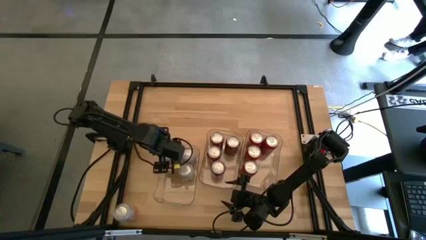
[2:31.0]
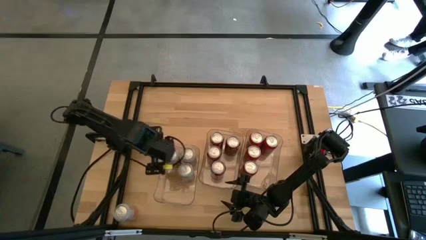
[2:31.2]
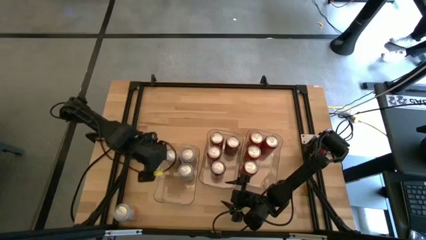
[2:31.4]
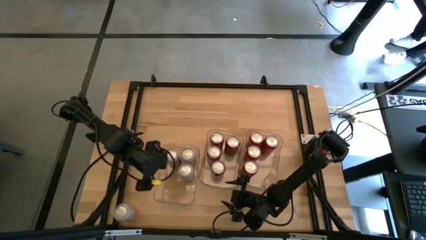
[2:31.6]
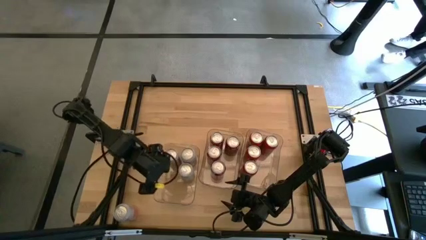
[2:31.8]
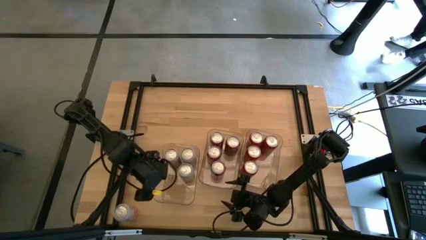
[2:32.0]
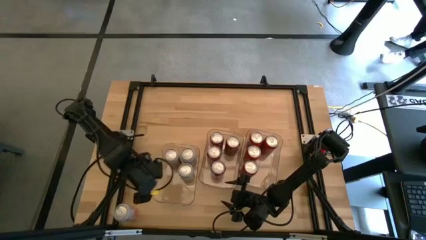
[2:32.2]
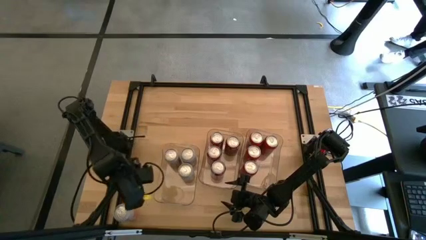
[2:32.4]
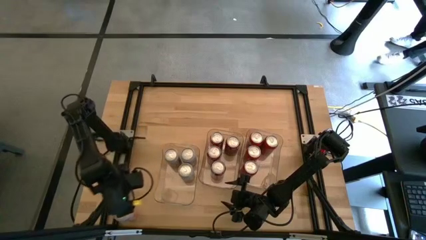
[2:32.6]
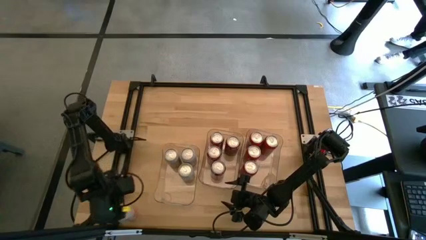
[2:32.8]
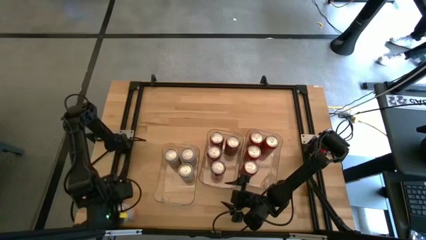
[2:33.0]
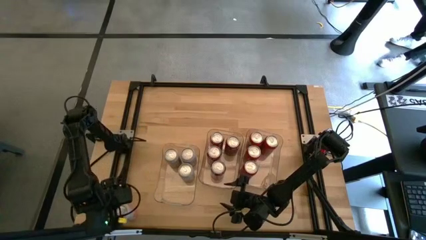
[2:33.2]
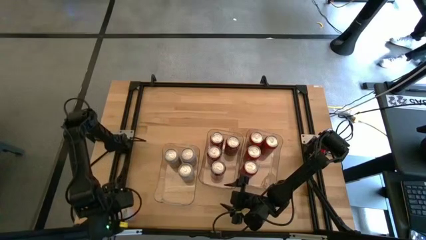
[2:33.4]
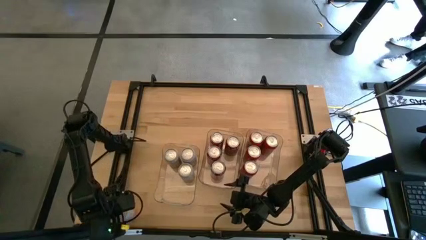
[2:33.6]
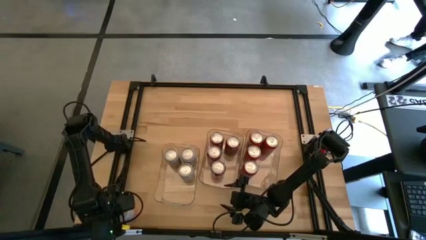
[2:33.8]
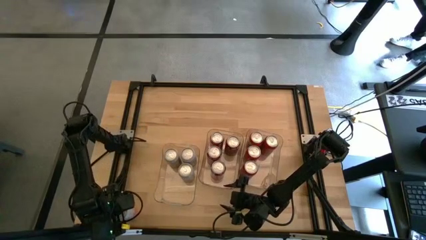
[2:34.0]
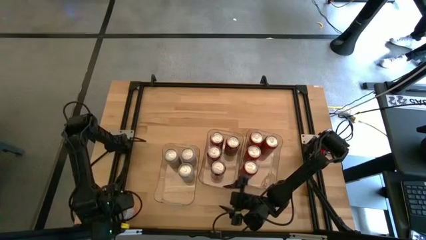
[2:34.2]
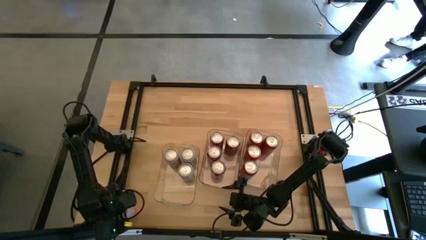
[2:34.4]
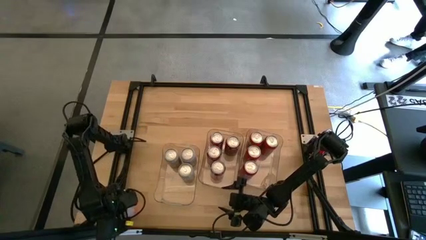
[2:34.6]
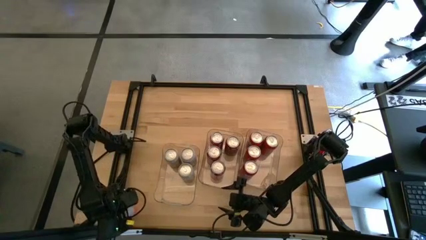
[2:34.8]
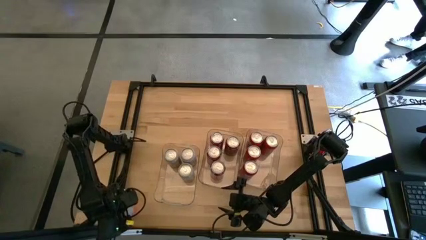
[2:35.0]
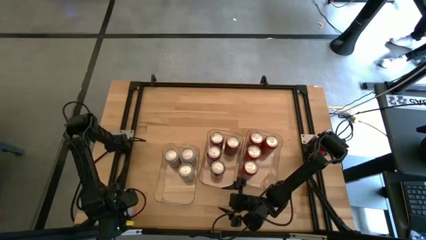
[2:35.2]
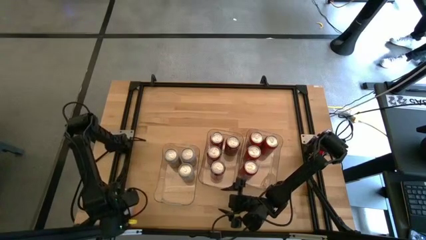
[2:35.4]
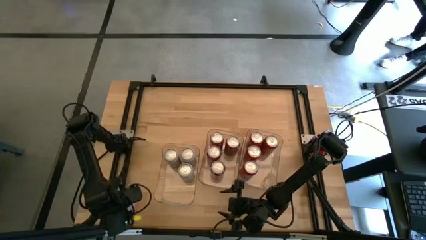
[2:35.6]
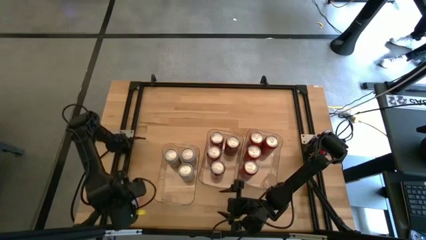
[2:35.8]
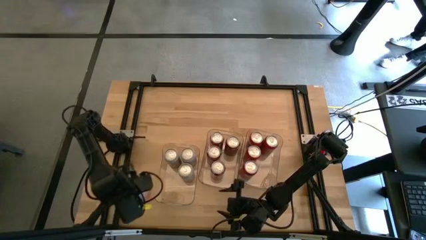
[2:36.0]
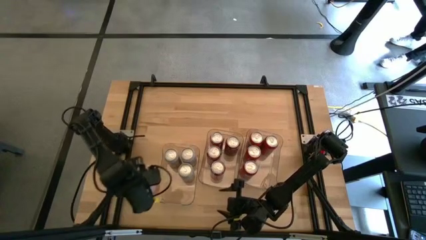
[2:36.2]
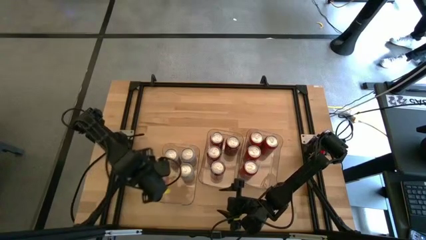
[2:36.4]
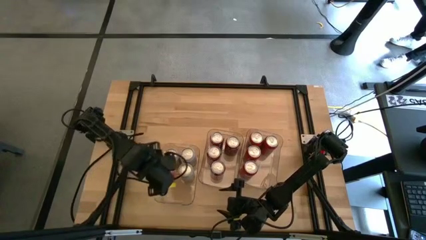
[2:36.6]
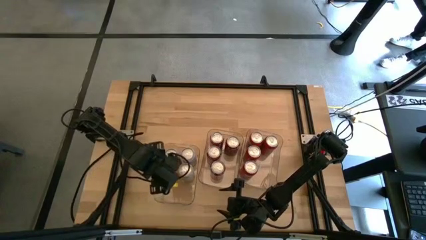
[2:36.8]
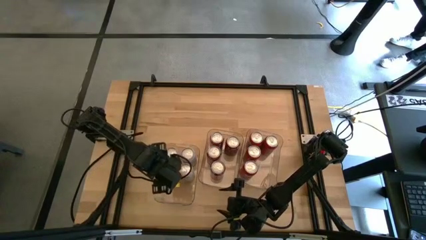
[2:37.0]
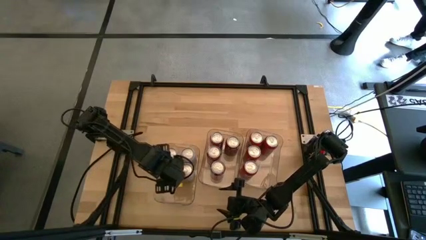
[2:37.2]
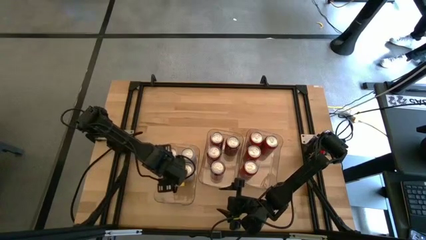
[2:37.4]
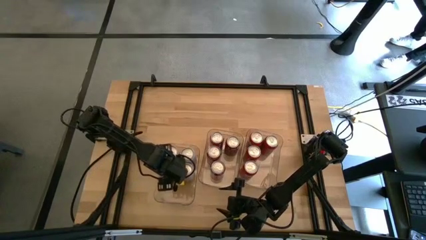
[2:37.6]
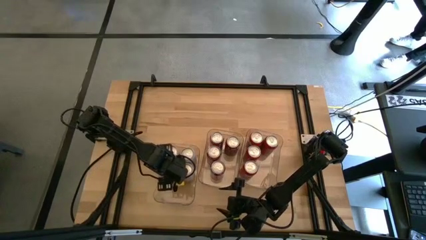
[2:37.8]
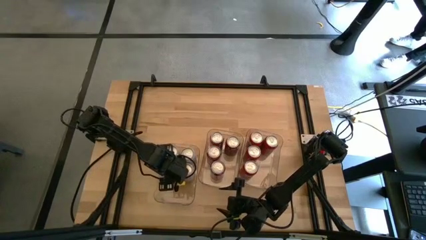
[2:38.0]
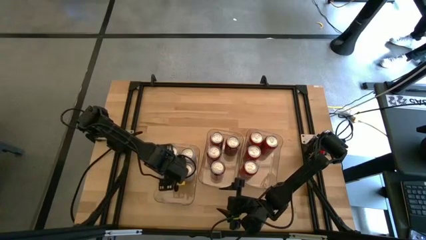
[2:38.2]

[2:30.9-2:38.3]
Task: Sort soda cans
Put the orange white soda can into the left transparent bin

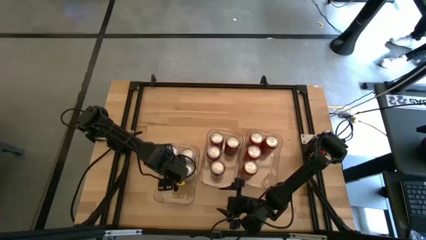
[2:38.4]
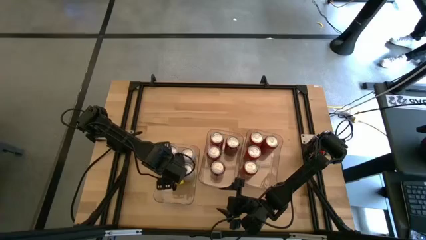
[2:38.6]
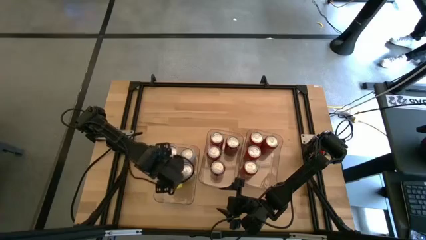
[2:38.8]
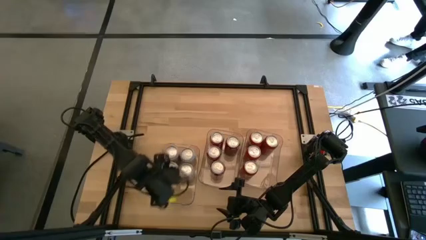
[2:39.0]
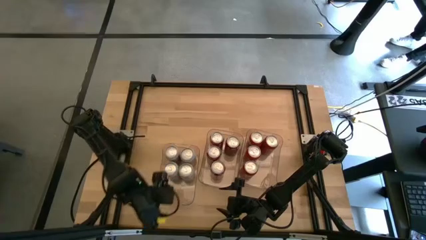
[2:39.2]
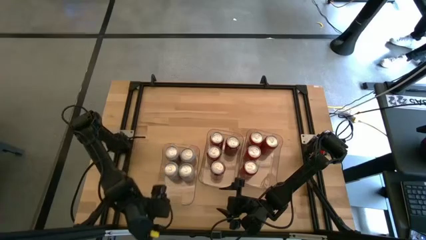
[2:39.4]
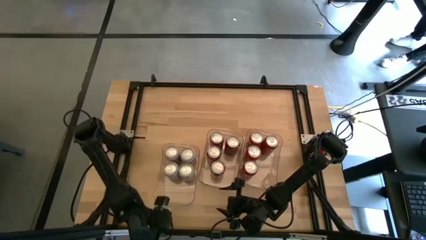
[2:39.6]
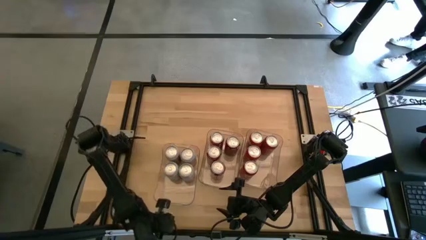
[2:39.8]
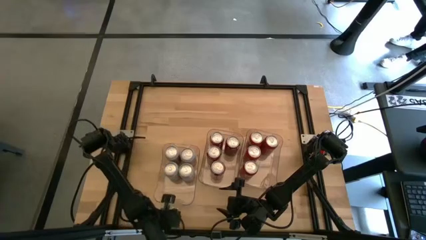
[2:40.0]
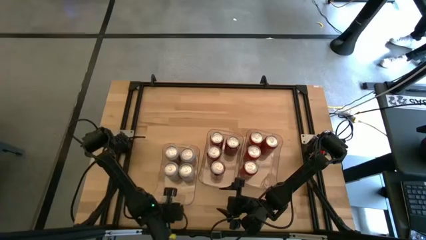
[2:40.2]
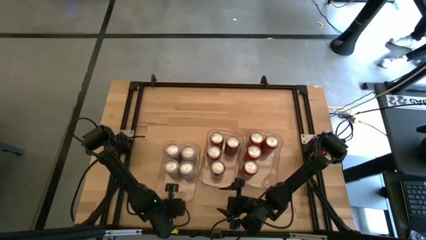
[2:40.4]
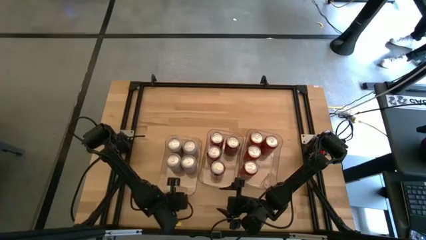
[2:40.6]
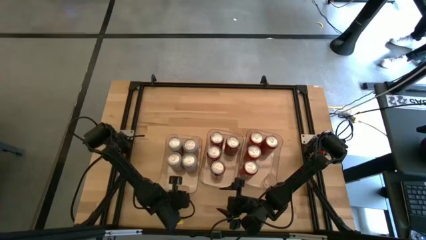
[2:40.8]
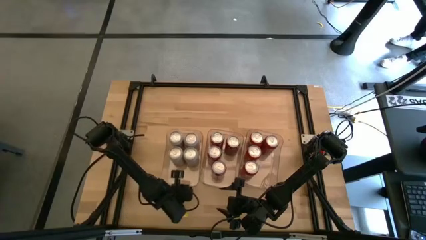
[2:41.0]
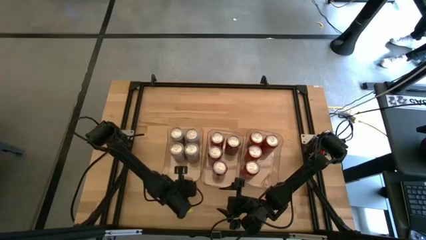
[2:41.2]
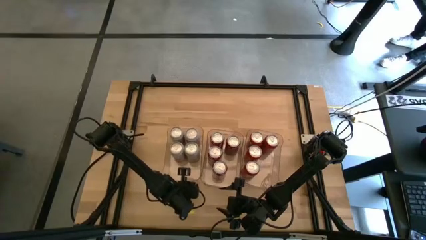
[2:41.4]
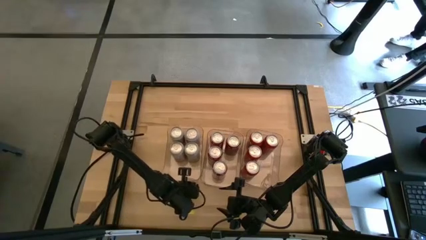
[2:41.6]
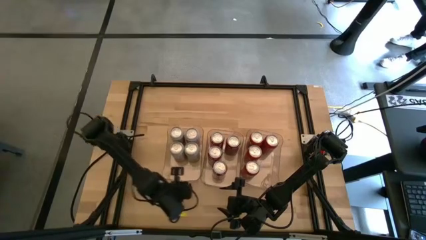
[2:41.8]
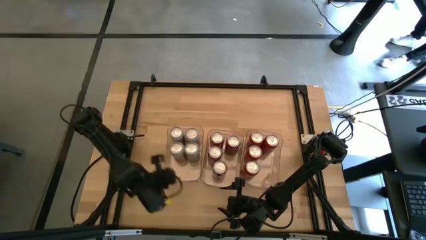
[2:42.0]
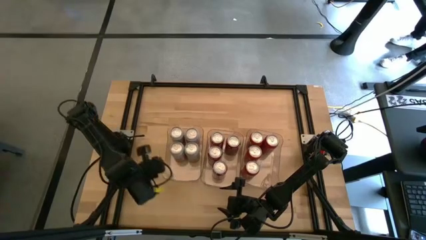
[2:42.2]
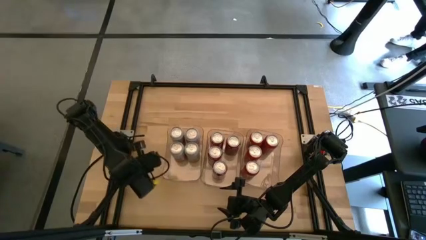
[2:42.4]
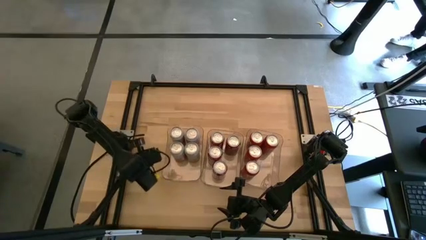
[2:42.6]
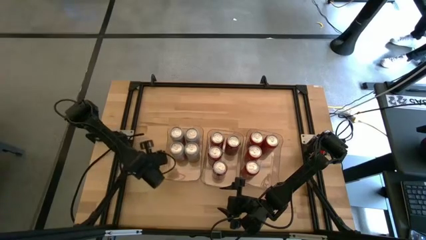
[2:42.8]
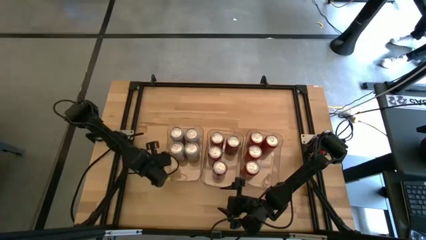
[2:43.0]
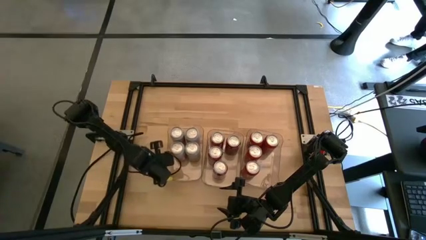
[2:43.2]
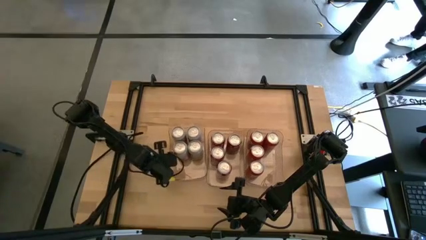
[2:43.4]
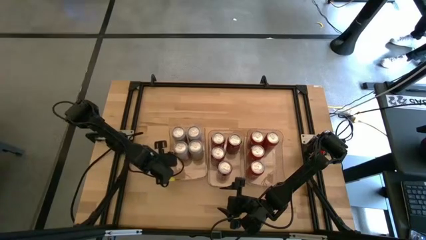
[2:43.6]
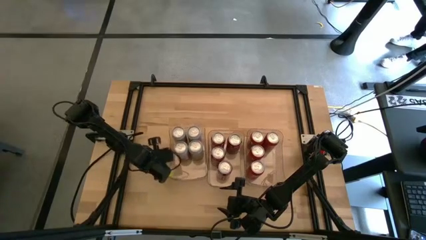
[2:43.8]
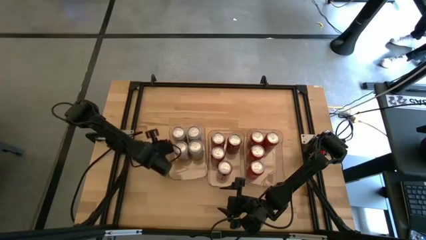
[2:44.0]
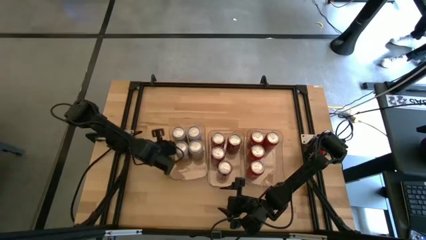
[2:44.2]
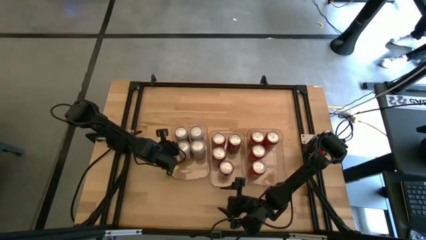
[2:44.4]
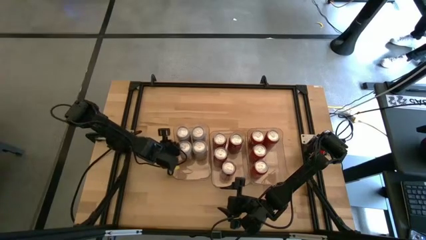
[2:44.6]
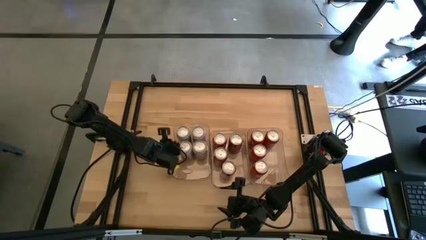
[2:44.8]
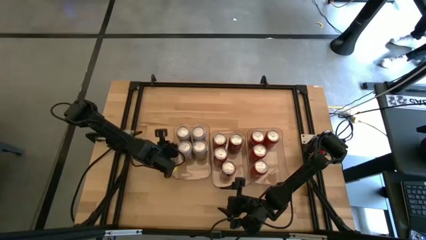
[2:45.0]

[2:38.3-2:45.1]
Adjust the left transparent bin

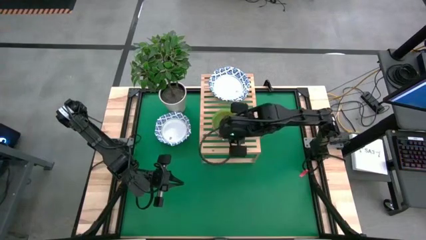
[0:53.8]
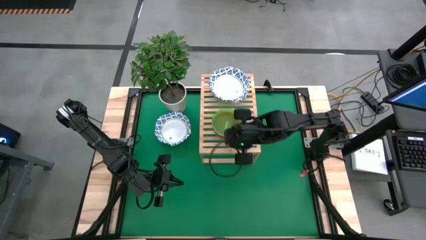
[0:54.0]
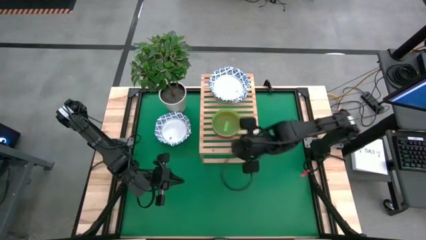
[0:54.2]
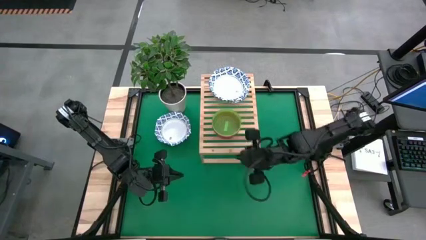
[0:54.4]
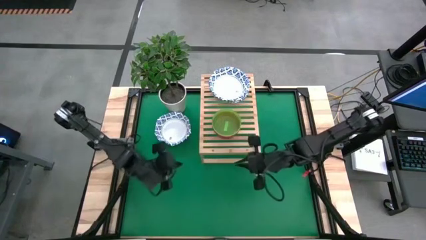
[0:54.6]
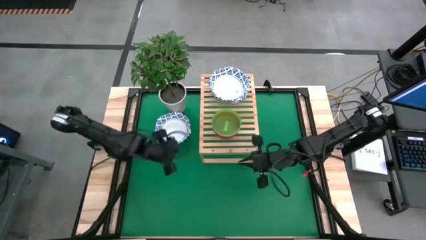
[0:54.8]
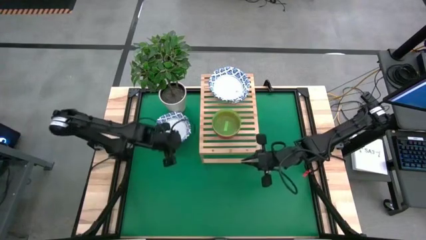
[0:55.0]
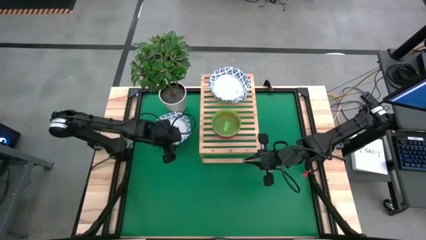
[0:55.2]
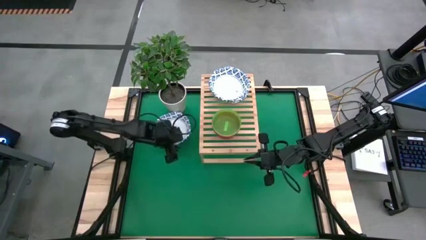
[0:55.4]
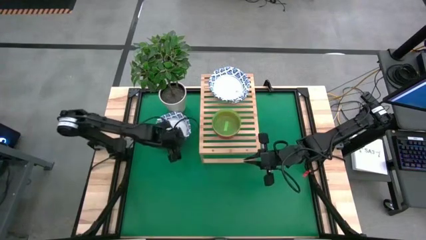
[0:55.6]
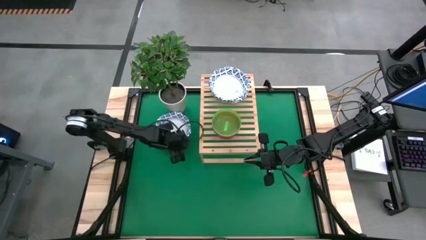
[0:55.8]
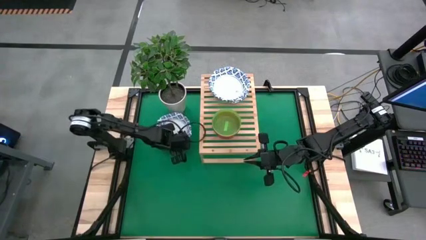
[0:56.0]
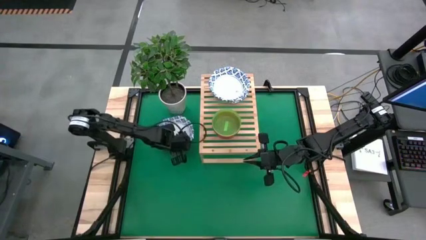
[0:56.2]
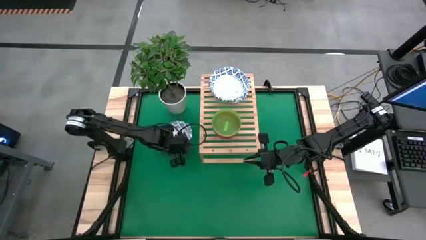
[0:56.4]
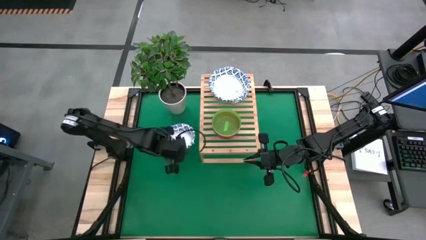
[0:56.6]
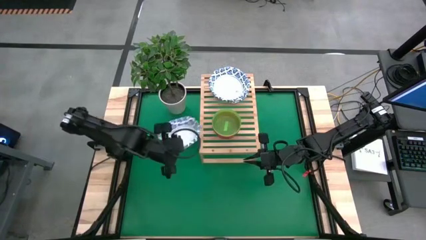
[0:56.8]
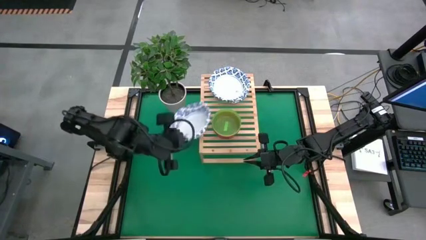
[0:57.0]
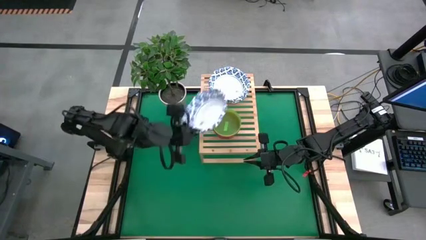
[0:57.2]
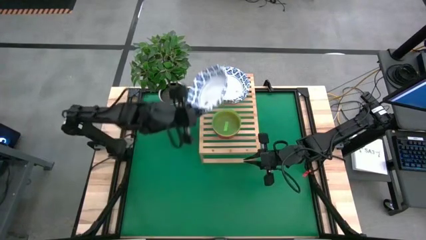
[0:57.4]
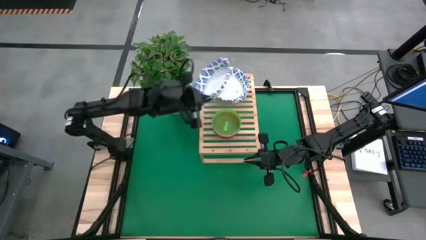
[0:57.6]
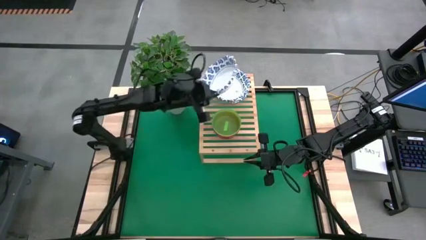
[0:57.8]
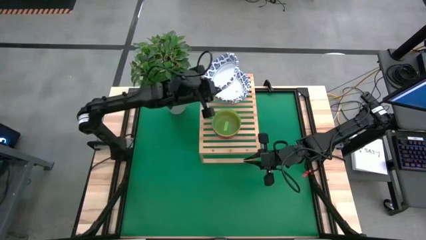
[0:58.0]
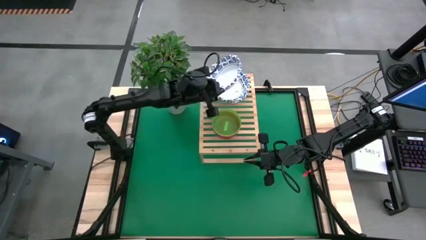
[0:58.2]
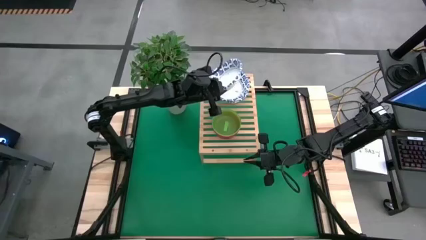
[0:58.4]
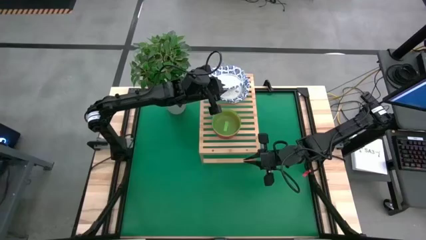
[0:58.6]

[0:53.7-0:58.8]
Task: Place and stack bowls onto a shelf
Stack the white patterned bowl on top of the other white patterned bowl on the shelf
